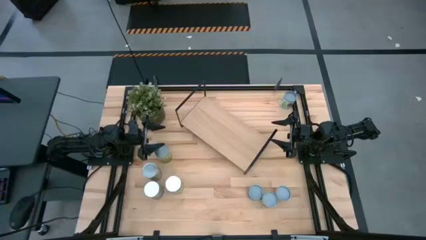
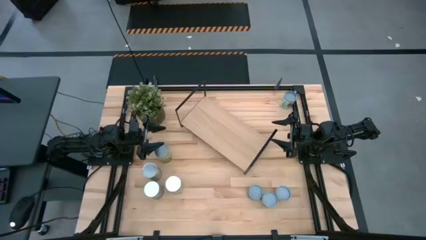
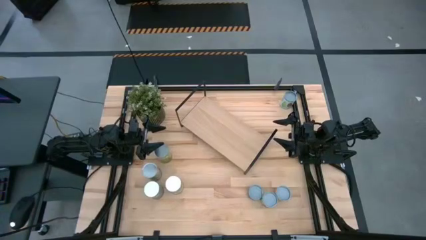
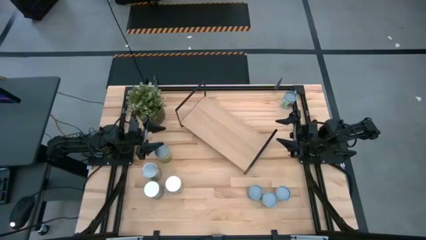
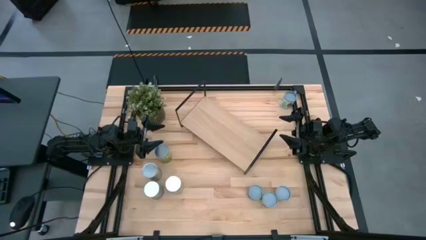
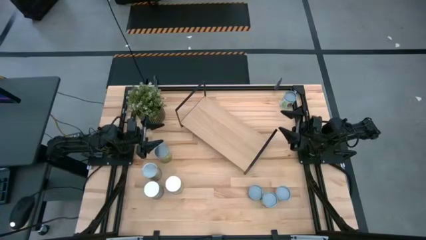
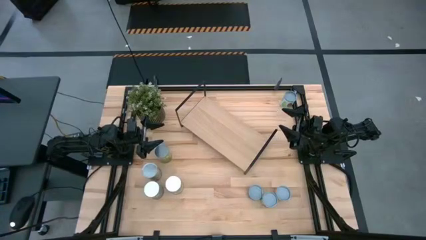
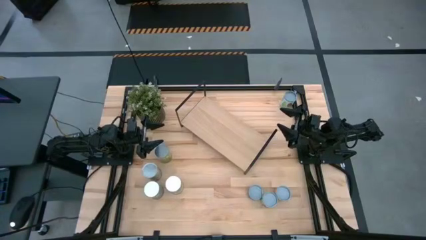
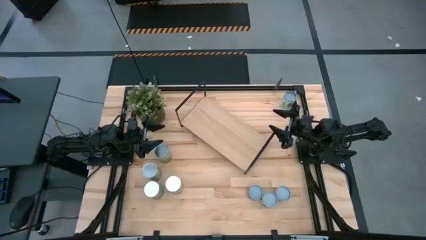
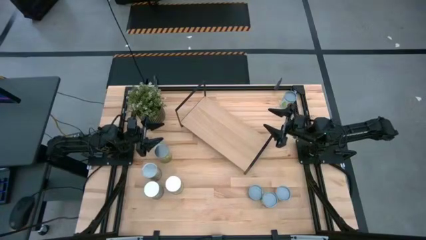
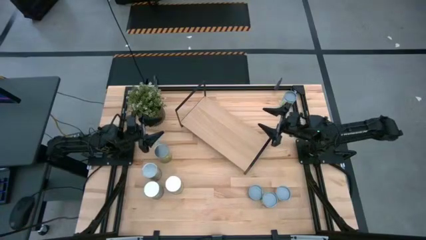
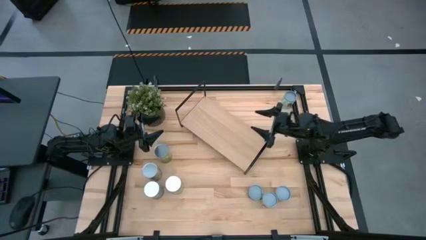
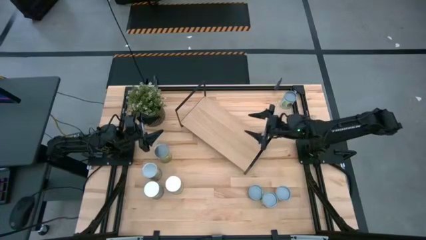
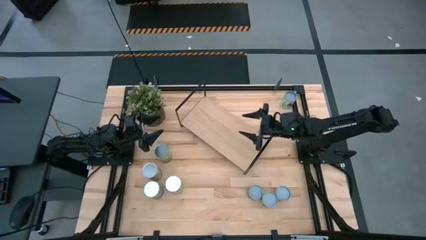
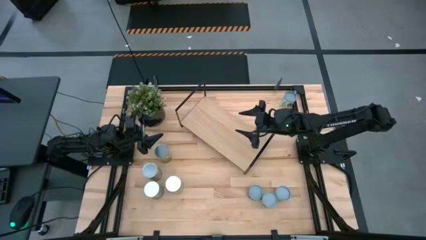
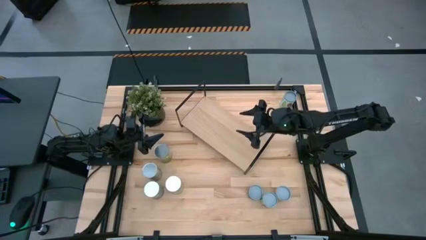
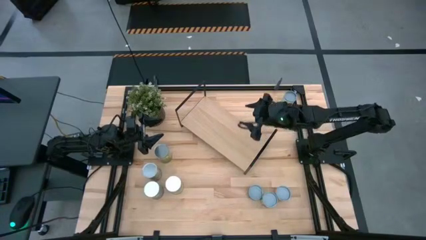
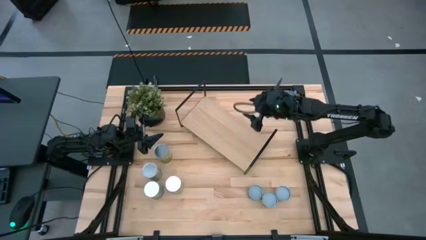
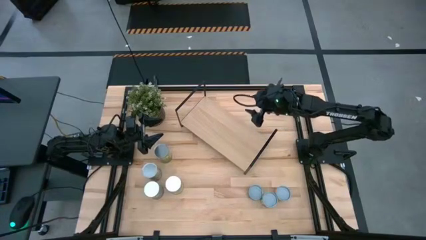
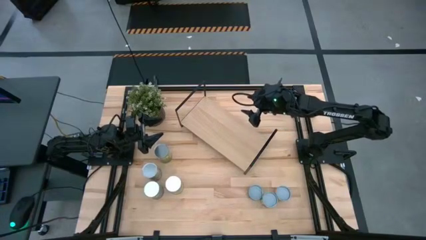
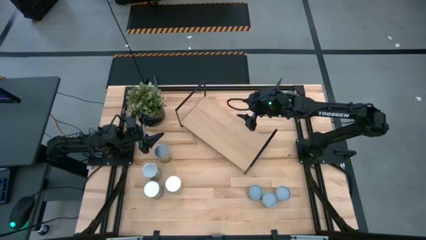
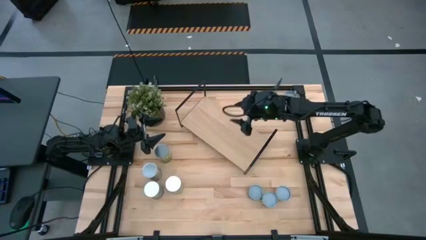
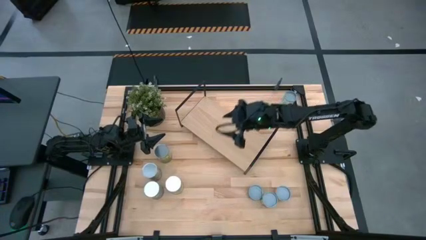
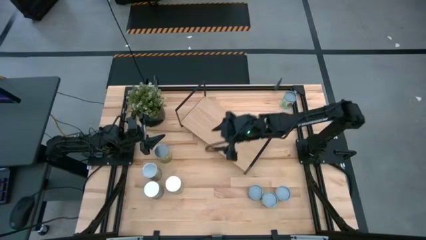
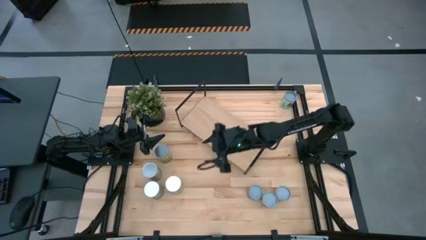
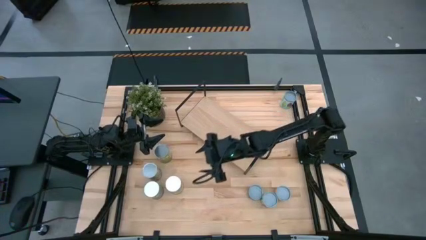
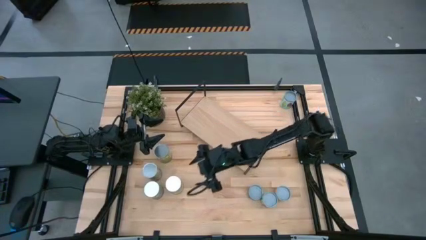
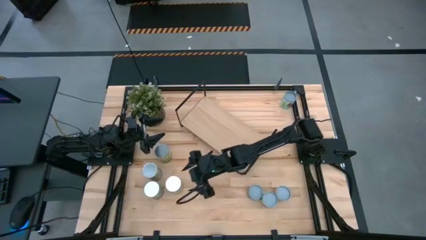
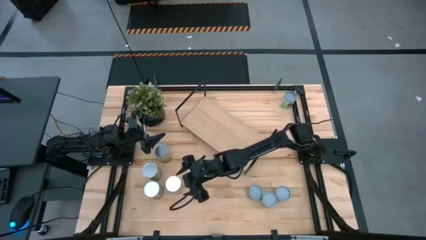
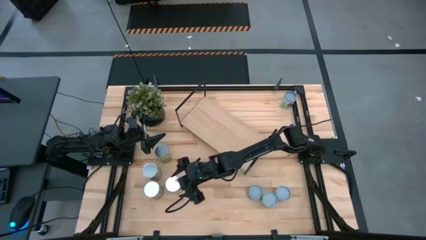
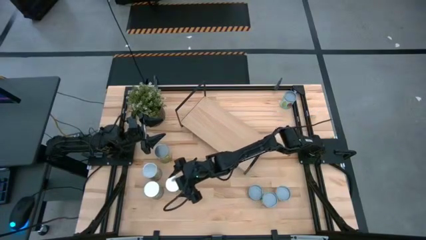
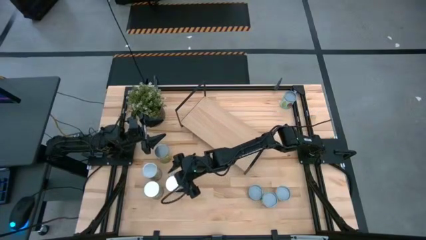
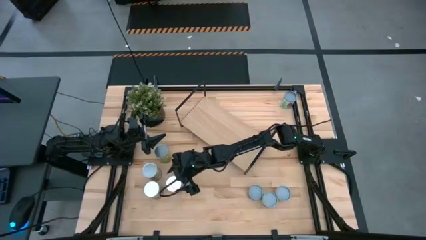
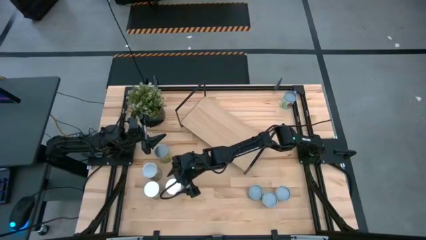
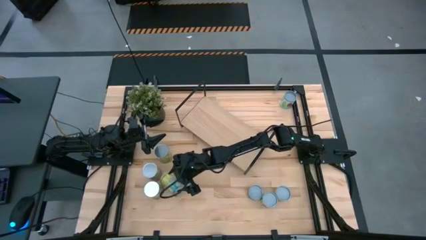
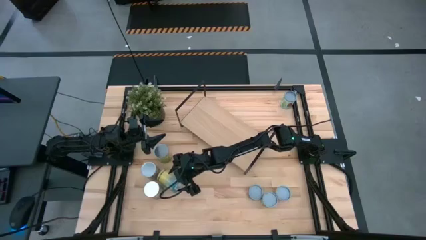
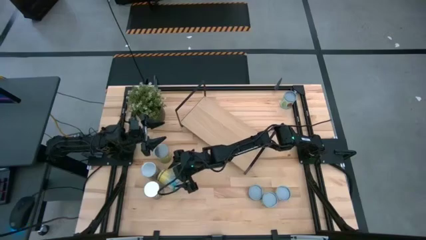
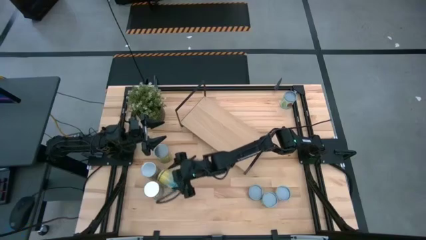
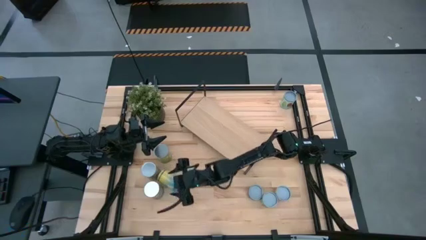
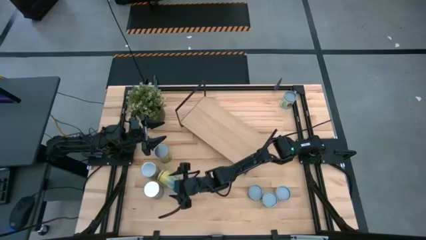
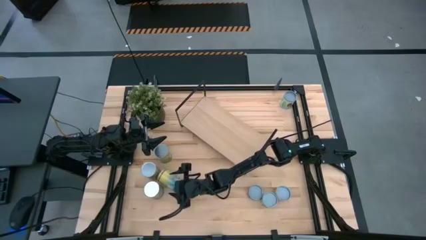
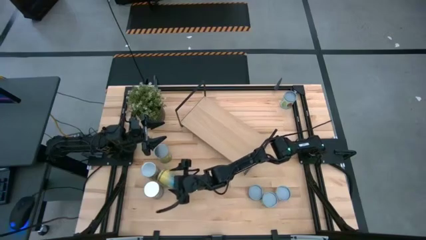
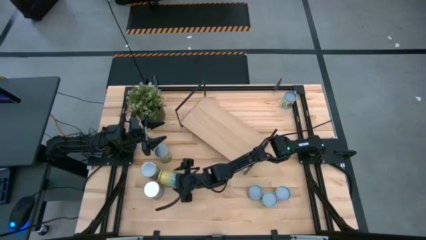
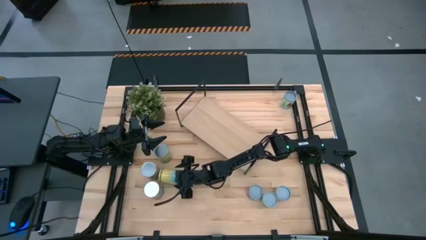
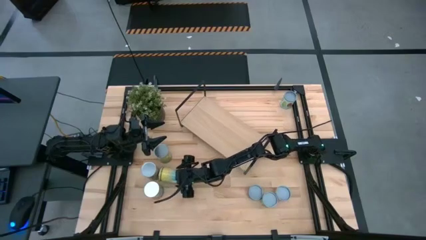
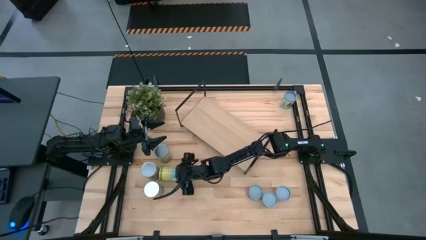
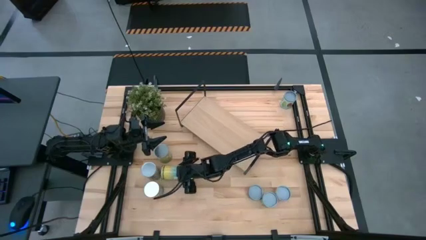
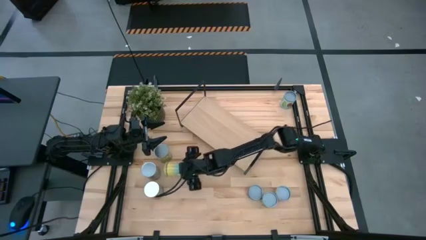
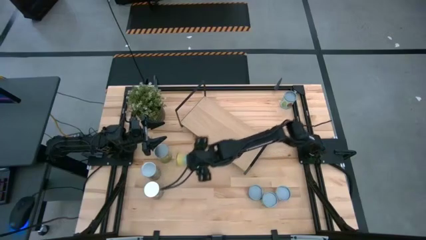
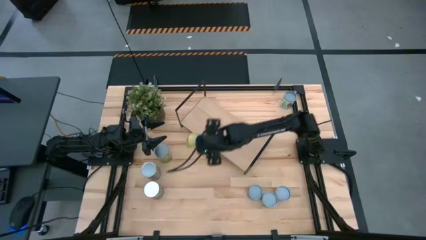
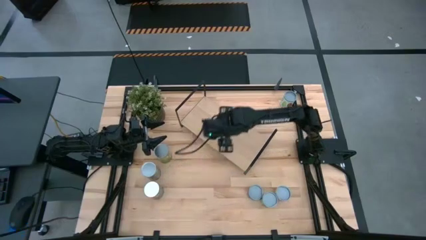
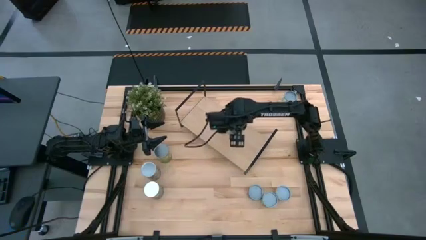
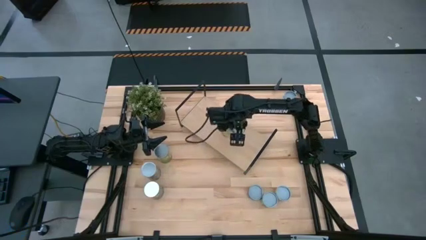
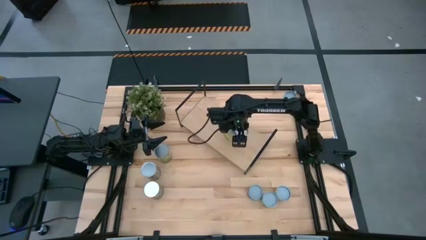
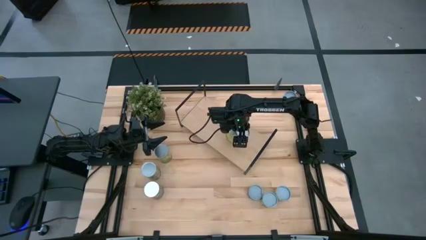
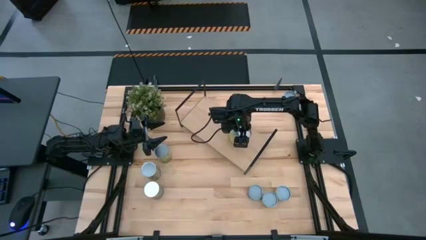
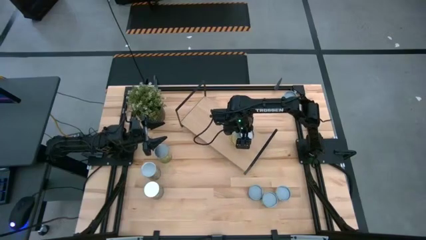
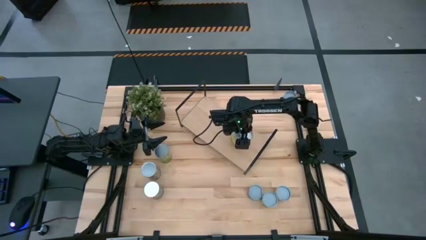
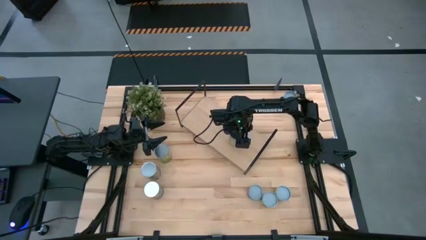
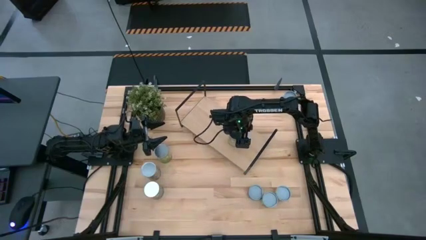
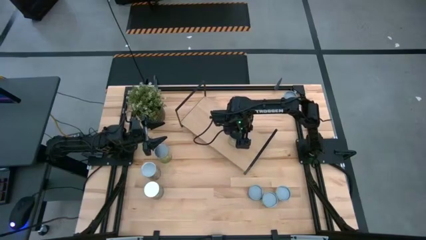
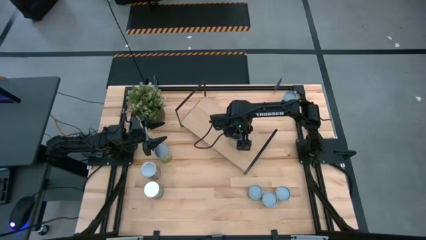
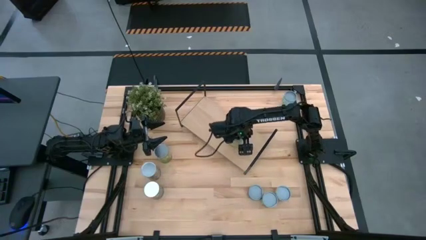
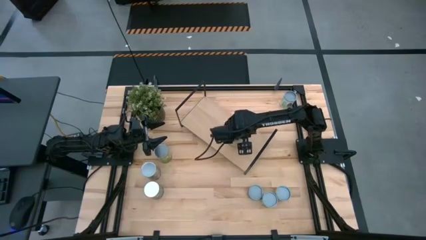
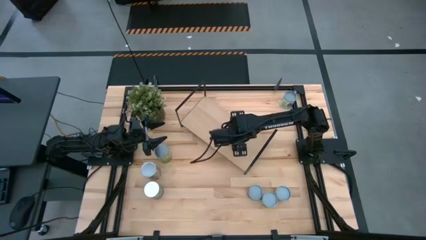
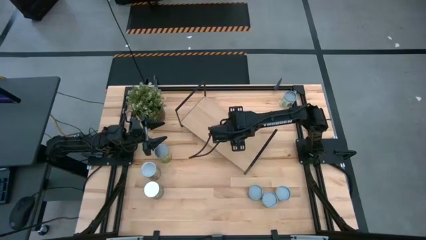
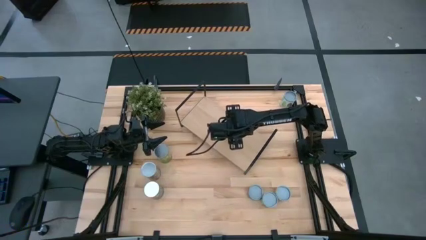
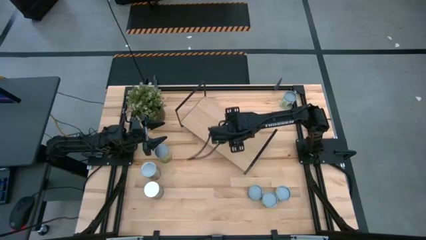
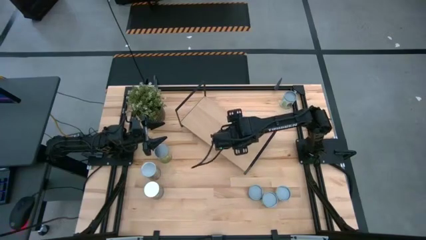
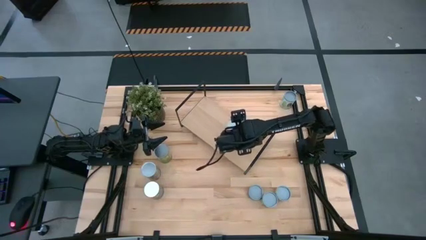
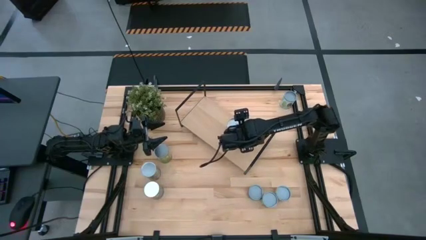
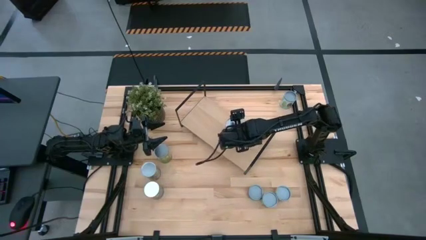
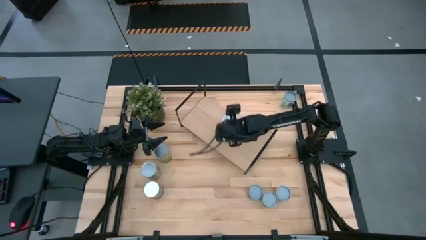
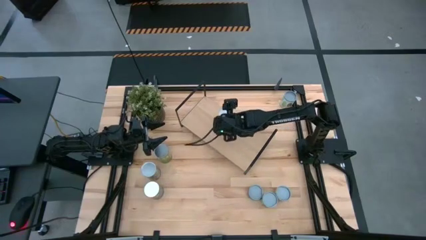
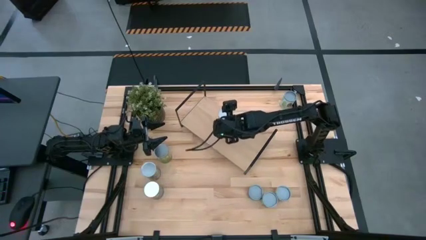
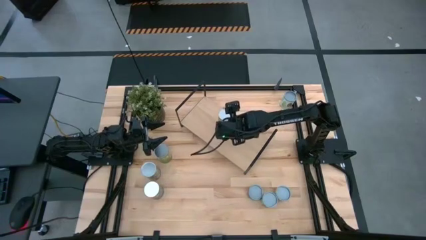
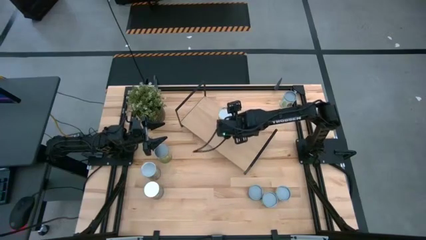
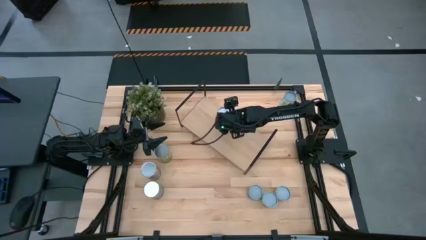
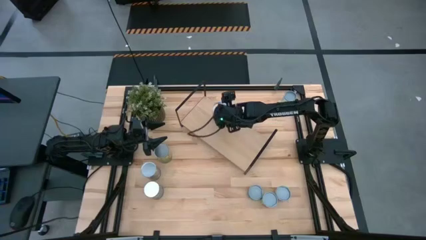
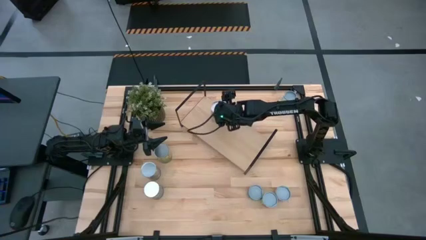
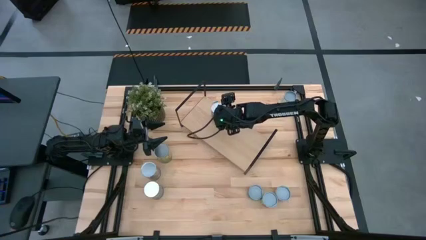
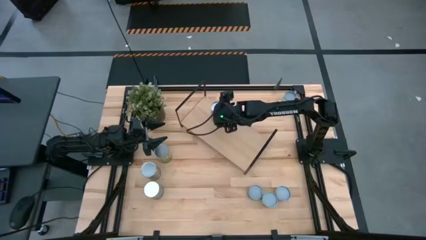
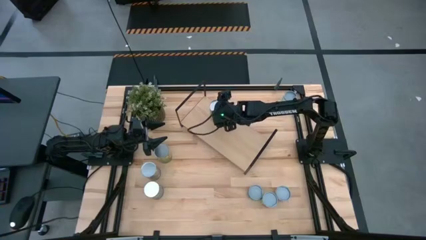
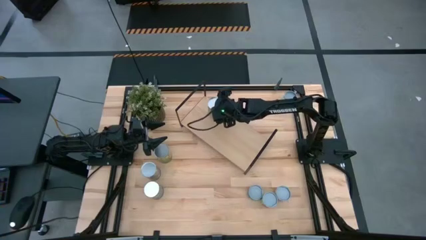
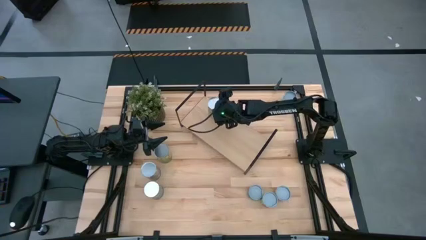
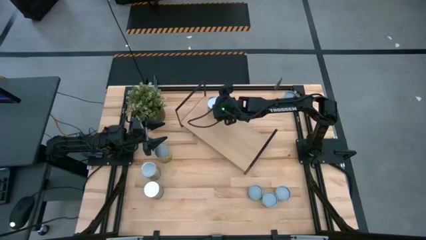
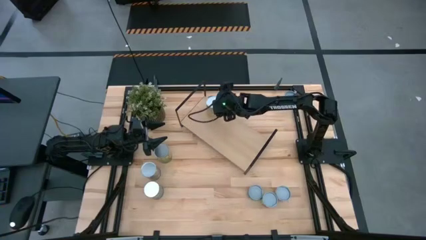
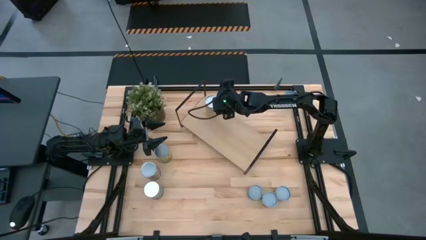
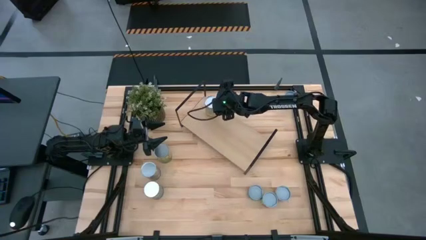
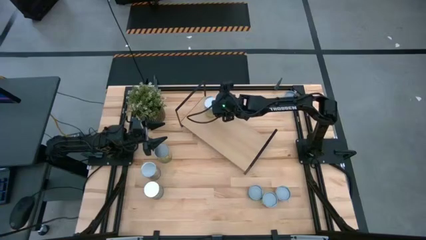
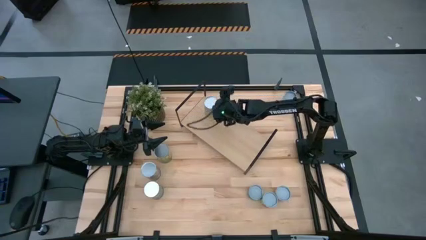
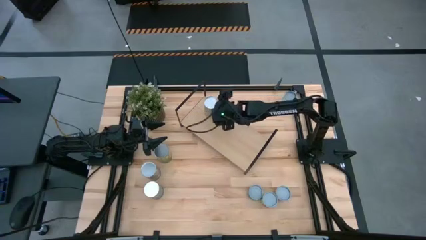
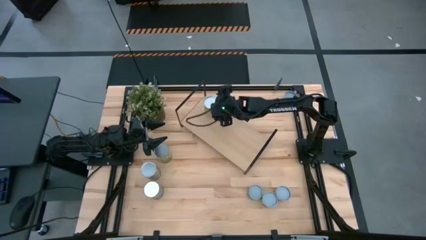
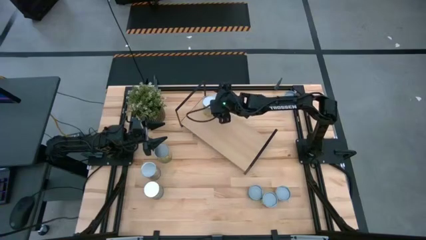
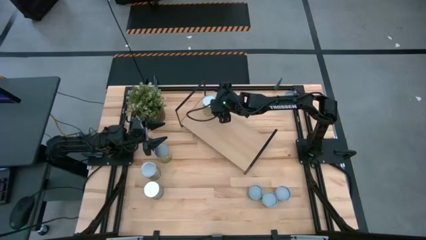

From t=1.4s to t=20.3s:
Task: Pick and place cans onto a shelf
Put the canned carrots on the shelf
